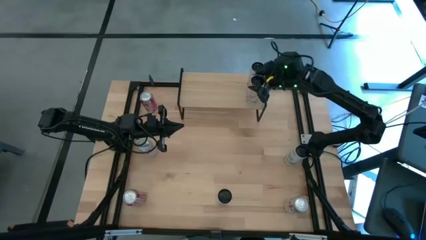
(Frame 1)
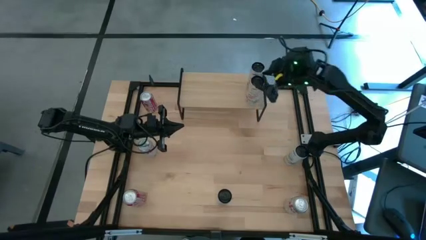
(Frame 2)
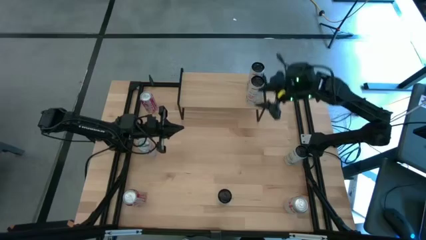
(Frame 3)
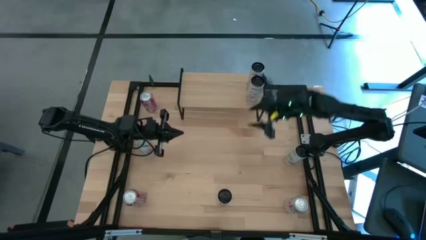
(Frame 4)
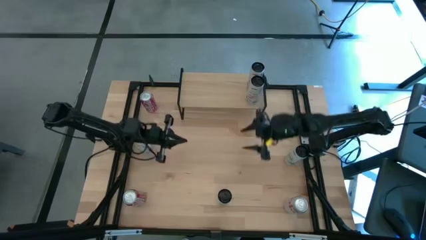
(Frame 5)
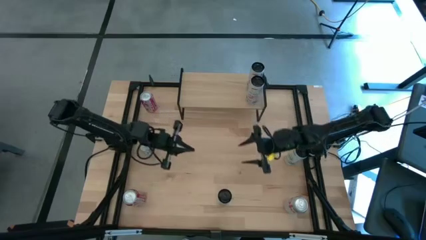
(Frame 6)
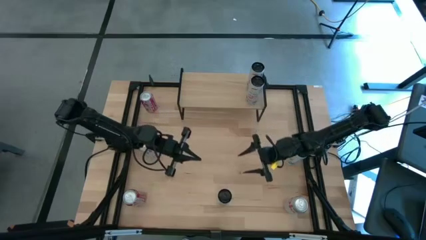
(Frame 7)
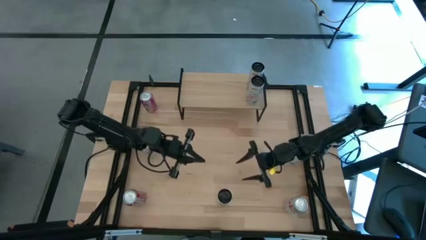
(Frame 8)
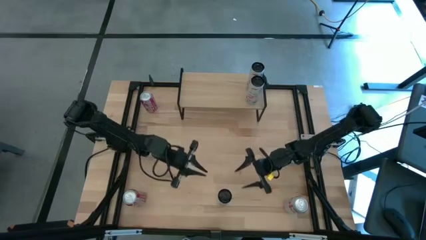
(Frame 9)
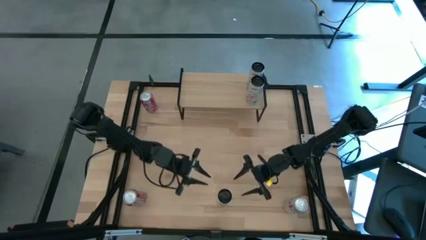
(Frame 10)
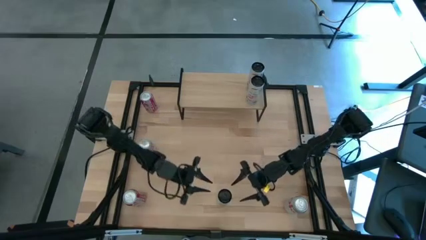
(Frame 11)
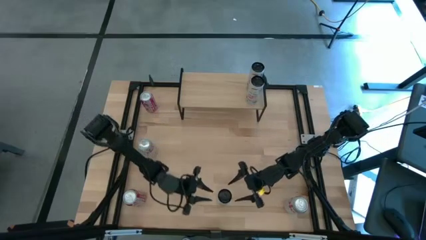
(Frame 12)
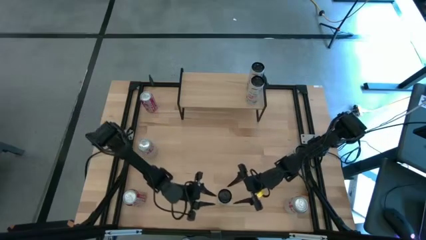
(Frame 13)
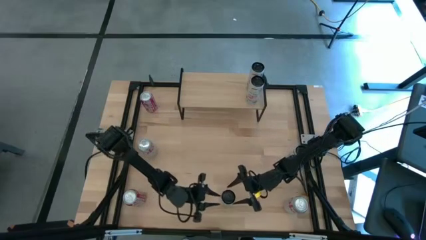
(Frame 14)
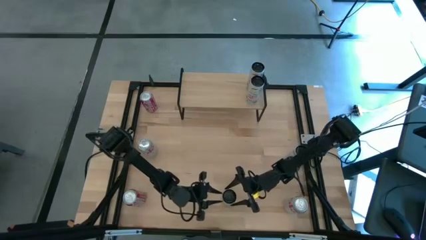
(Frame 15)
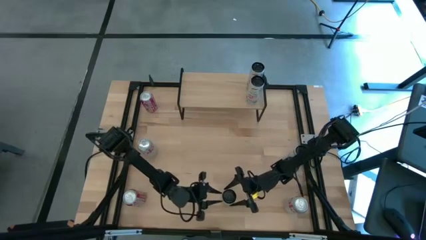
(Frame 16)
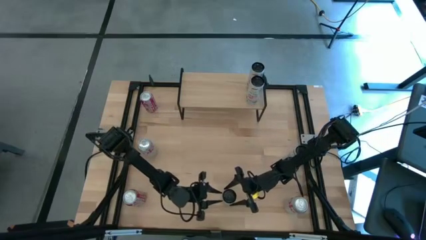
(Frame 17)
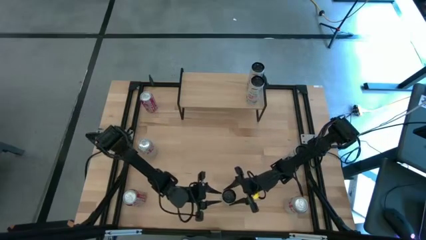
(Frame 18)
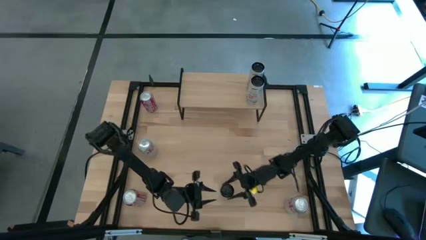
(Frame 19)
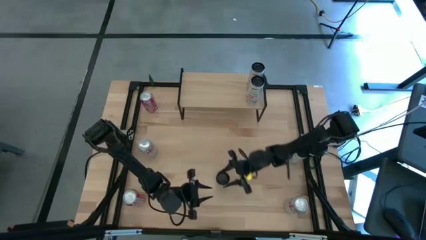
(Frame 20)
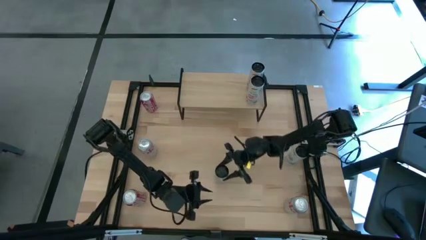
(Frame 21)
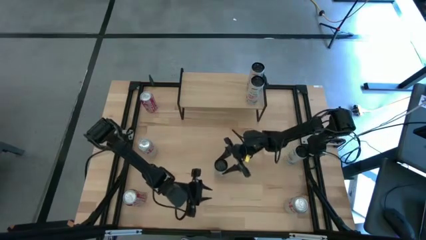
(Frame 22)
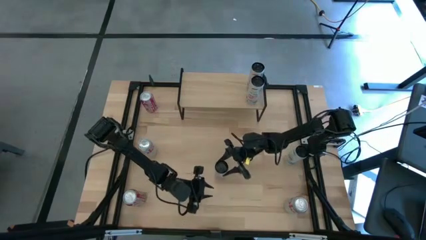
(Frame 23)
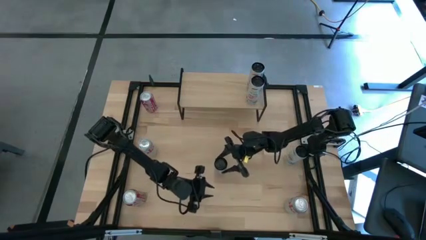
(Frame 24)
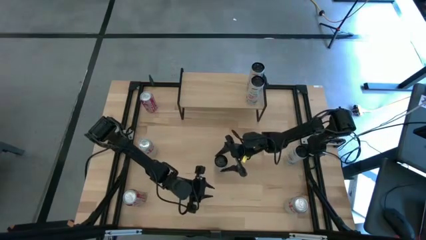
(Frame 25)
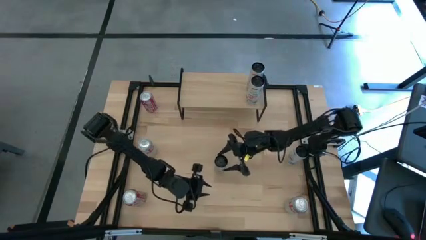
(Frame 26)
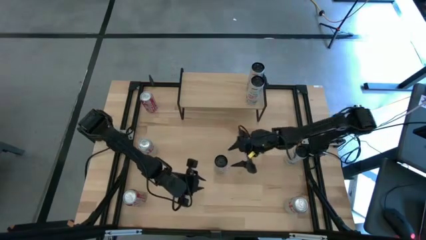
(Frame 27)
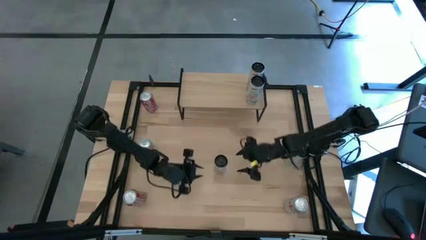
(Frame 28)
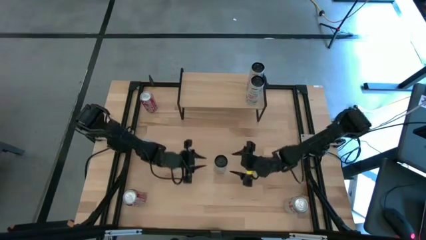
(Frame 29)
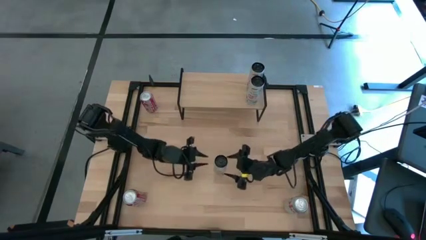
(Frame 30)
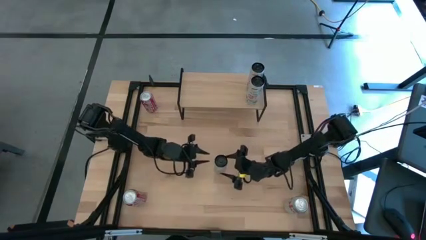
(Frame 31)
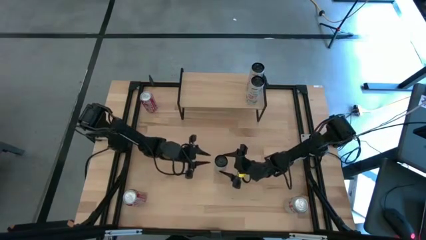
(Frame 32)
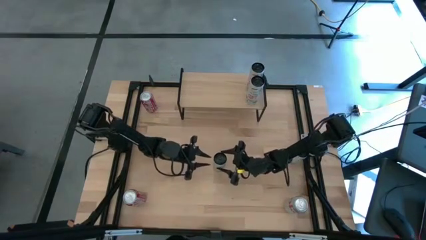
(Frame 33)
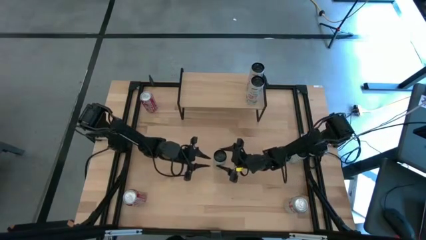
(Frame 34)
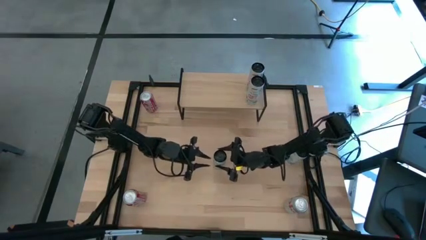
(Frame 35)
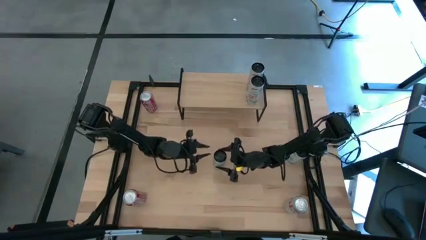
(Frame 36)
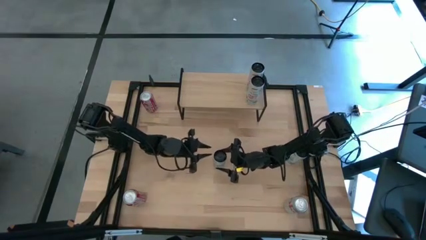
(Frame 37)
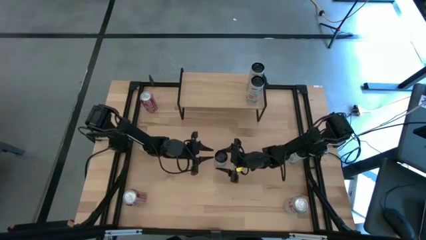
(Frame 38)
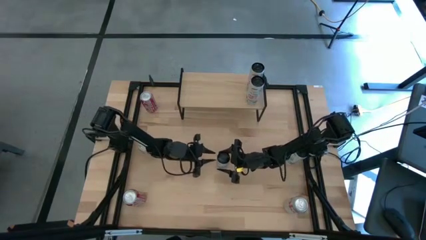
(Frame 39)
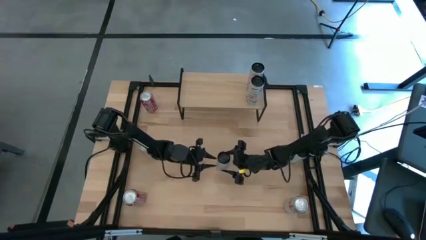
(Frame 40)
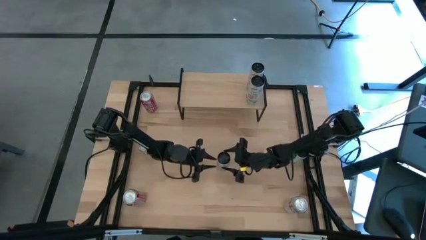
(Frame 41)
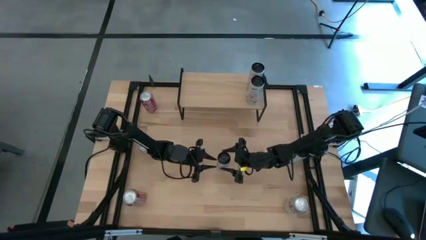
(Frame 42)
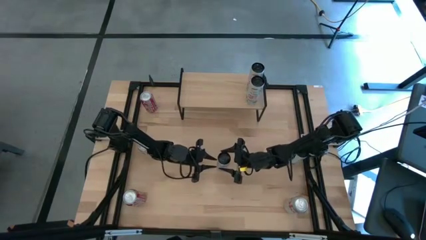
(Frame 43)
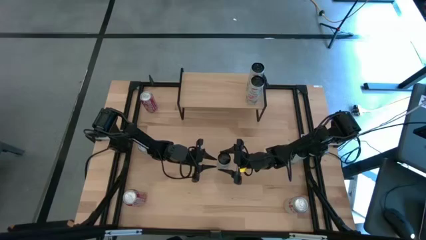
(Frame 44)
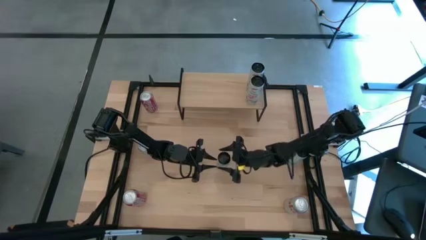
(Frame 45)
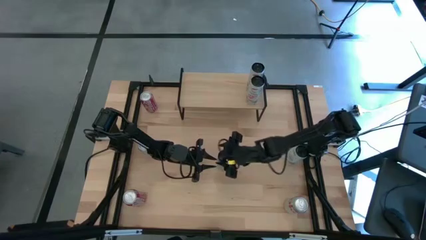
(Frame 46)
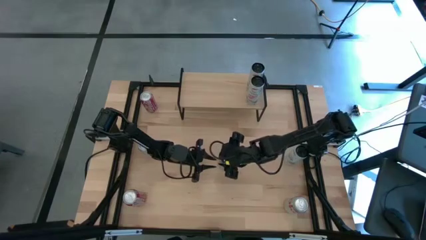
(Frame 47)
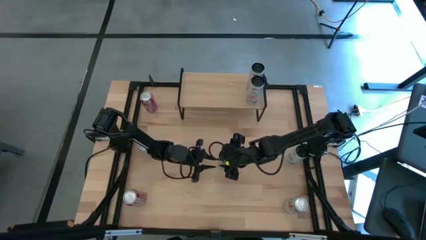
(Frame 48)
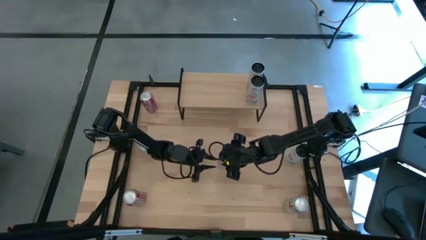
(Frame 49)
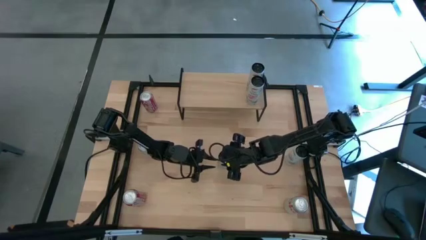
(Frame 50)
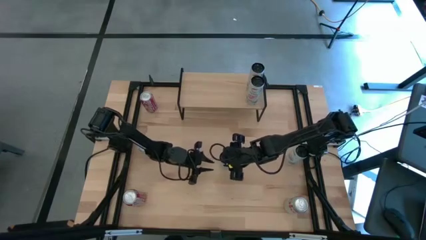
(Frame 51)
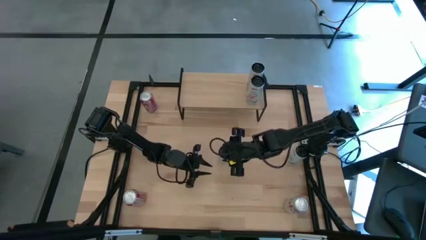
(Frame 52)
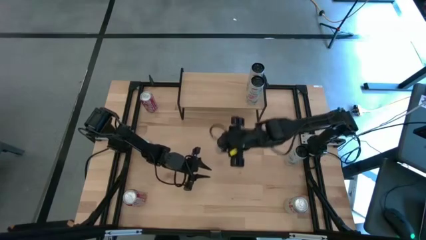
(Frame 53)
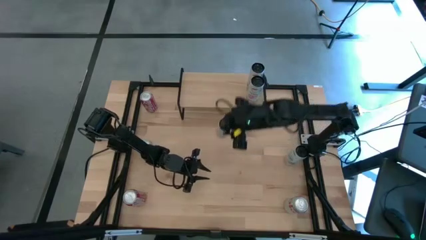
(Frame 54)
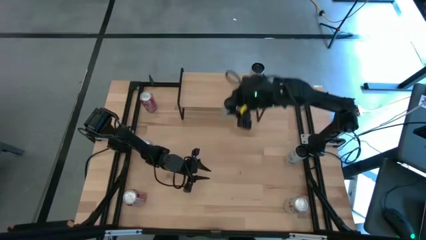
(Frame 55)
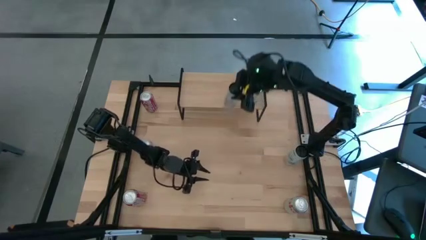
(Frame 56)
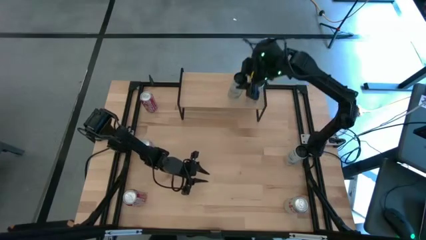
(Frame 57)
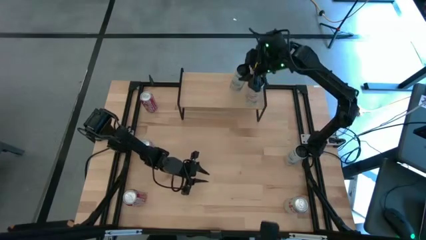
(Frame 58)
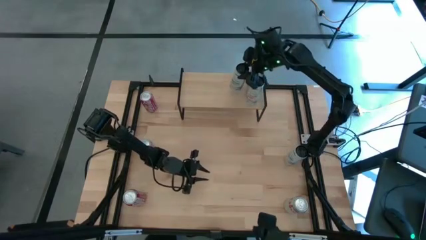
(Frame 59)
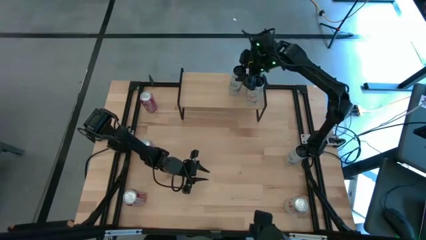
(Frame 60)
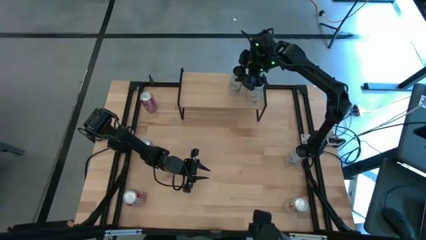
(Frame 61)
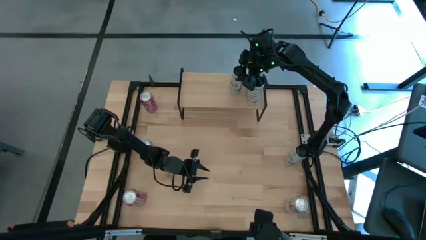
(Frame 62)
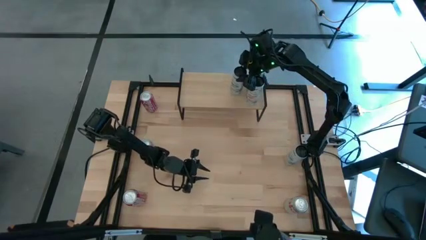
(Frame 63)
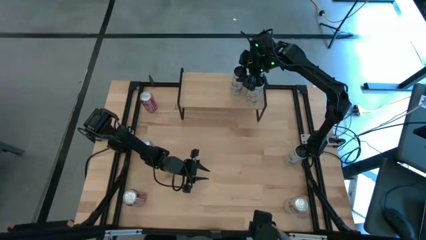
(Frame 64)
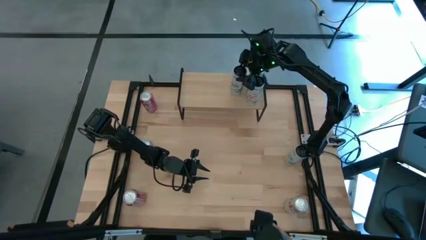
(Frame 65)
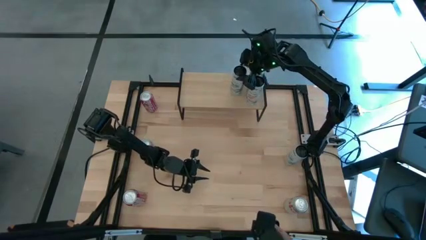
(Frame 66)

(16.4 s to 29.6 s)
Task: Place canned beverage on shelf
Put the white blue soda can on the shelf

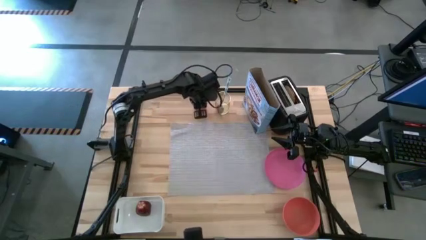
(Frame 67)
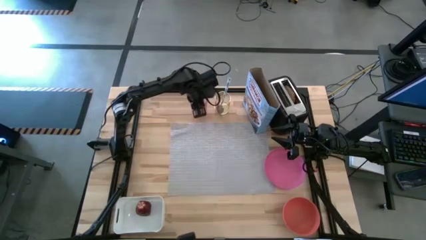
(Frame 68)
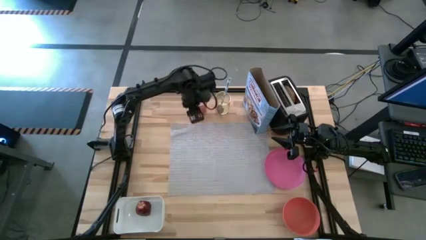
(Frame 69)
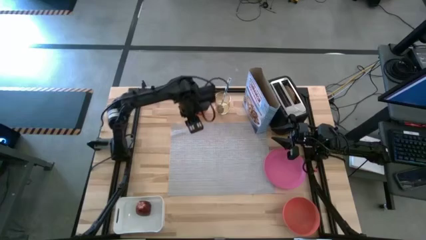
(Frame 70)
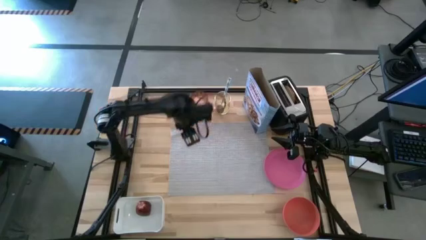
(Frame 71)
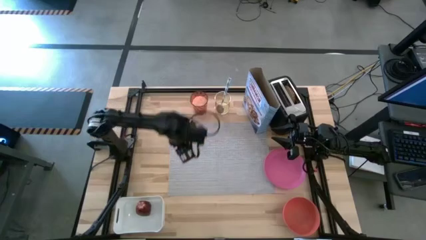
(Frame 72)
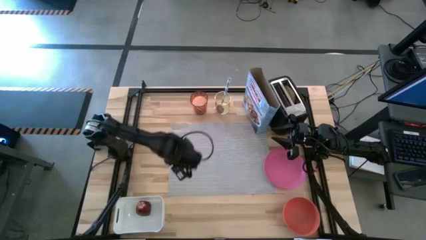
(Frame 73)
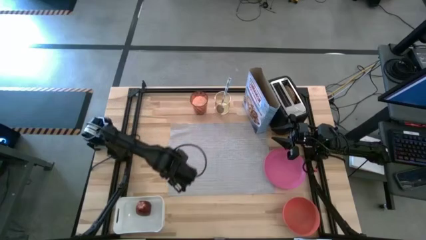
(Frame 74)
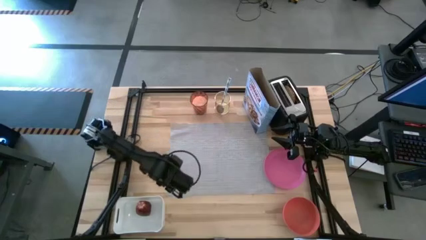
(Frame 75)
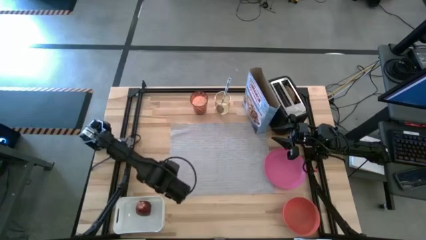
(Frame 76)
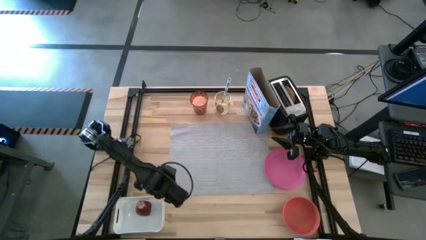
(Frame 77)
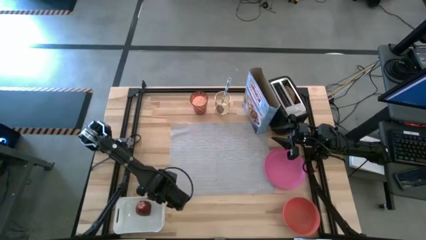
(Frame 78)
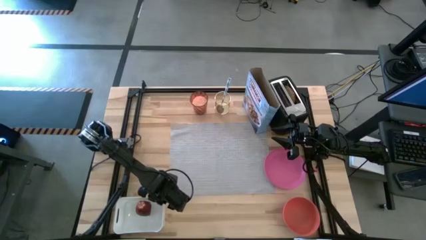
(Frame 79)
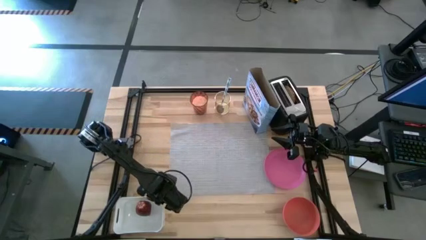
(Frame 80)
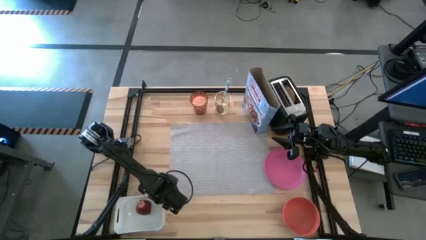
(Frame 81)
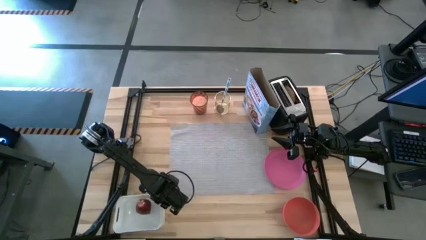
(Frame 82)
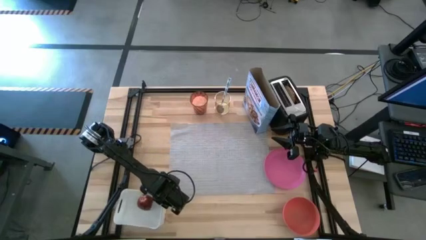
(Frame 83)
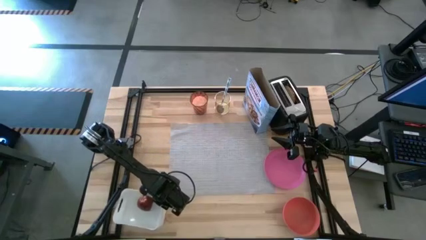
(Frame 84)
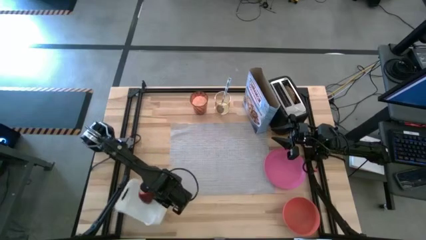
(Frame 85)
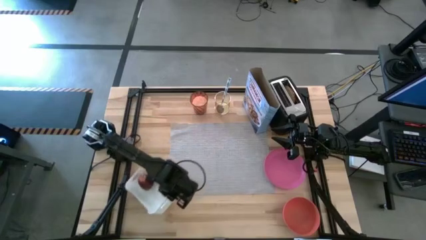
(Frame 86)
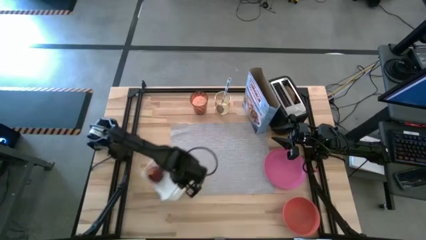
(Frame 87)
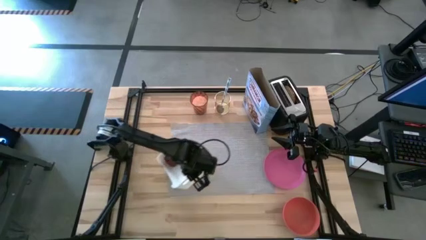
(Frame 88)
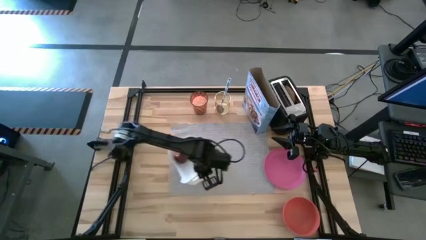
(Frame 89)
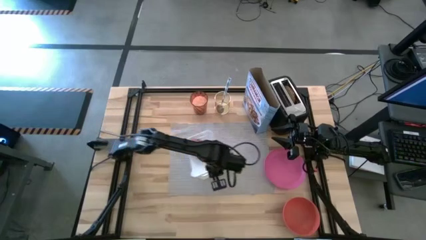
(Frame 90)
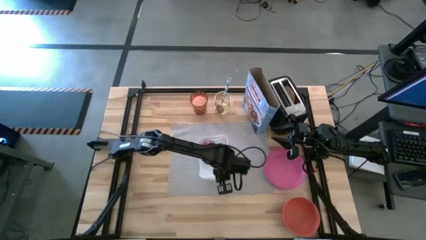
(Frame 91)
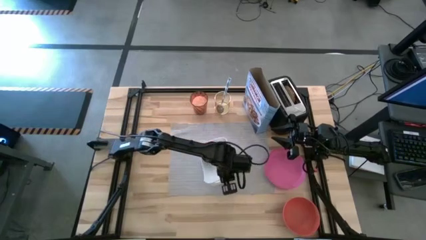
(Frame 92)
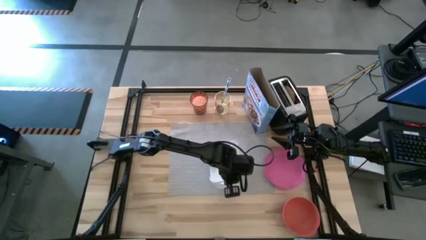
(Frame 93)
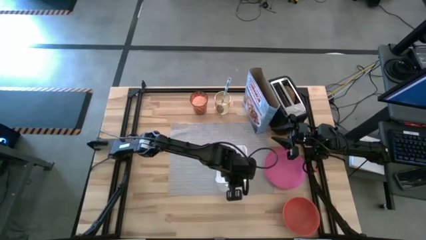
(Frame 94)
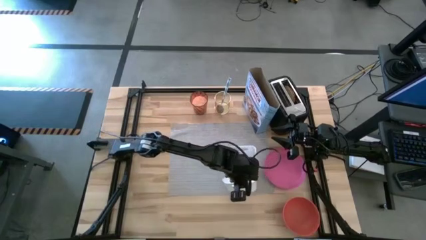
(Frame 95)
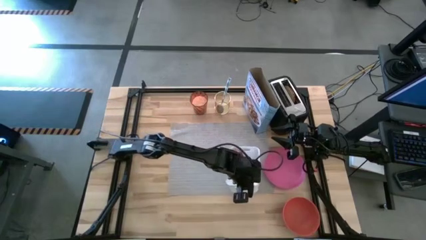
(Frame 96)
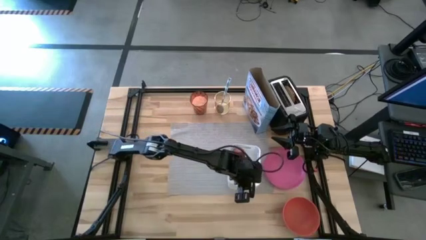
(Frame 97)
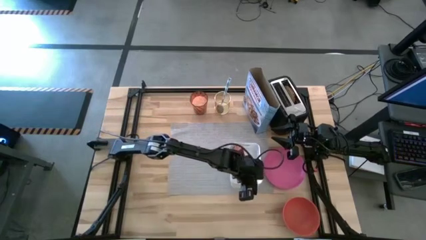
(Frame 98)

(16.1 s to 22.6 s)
Task: Arrange a breakfast setting
Move the white bin to the left of the pink plate
